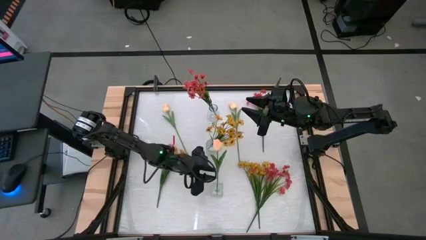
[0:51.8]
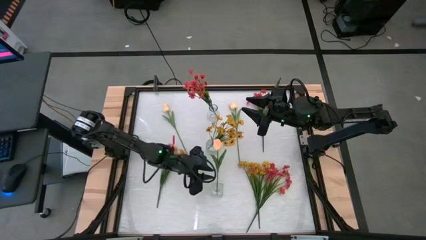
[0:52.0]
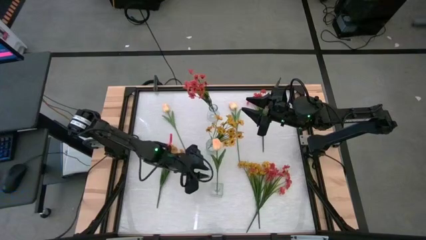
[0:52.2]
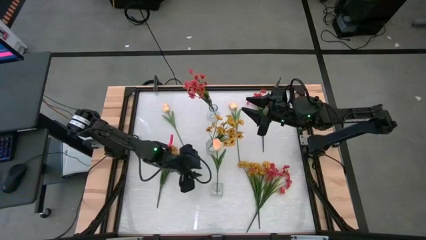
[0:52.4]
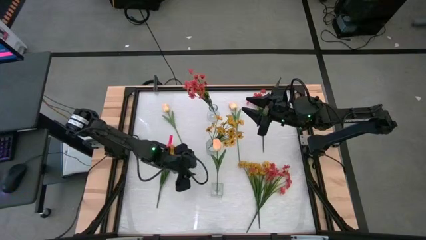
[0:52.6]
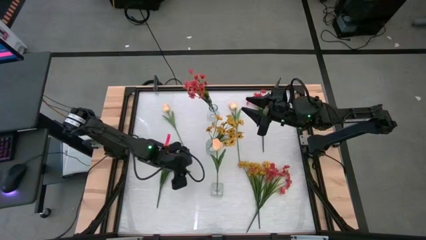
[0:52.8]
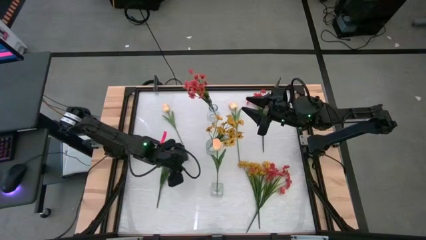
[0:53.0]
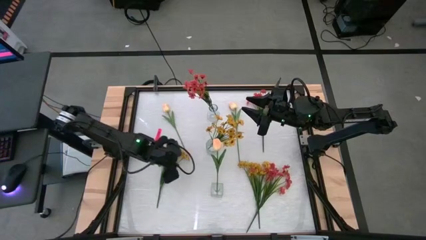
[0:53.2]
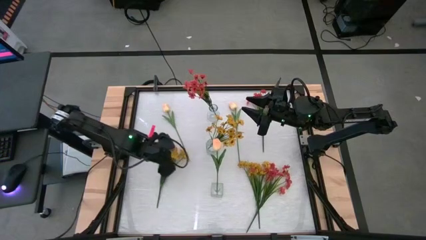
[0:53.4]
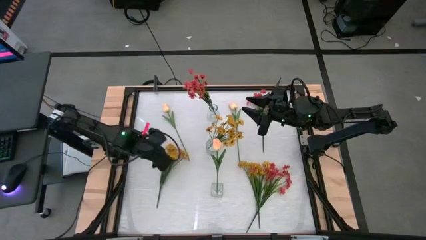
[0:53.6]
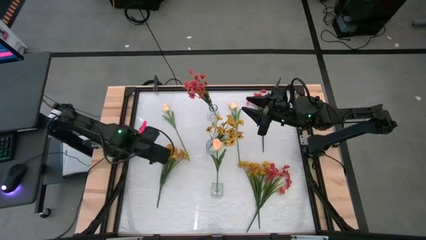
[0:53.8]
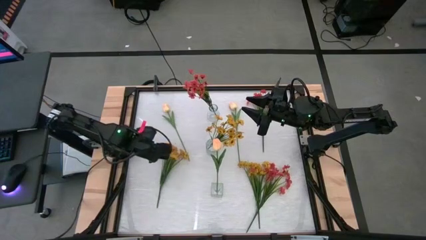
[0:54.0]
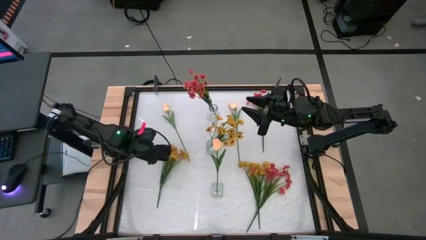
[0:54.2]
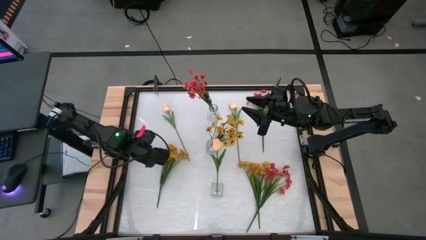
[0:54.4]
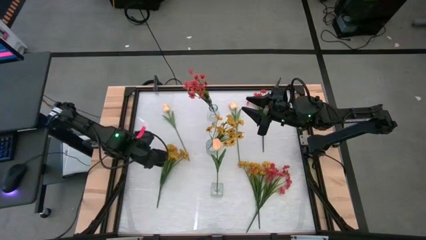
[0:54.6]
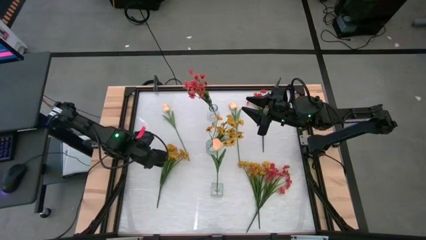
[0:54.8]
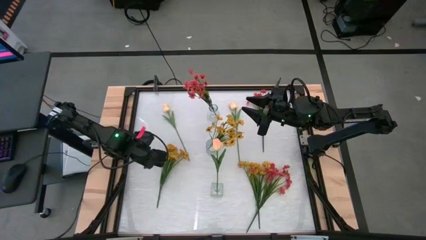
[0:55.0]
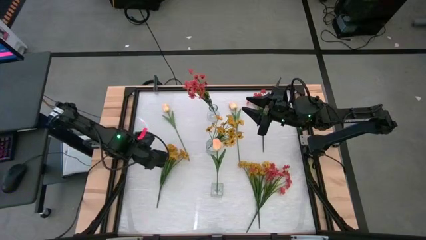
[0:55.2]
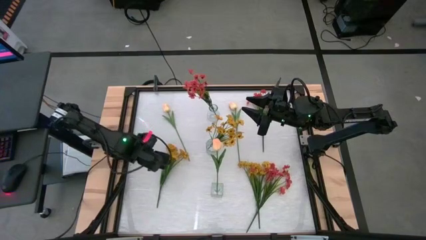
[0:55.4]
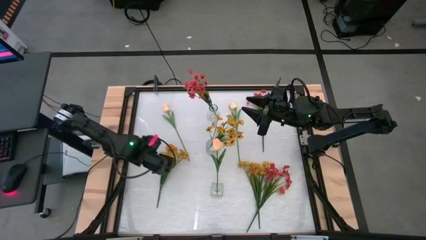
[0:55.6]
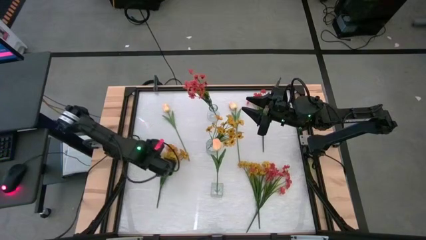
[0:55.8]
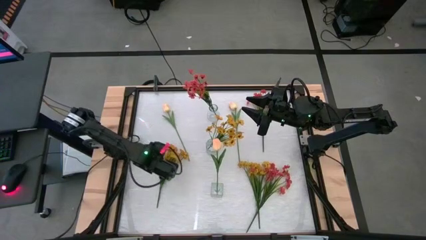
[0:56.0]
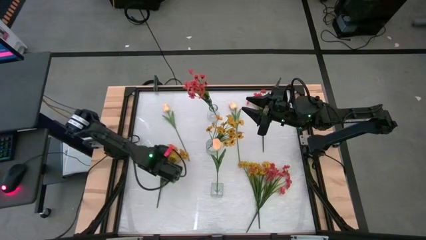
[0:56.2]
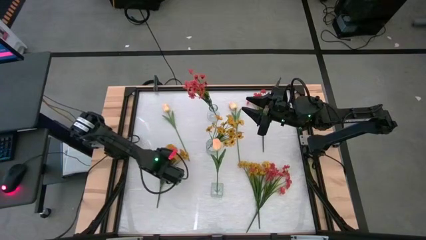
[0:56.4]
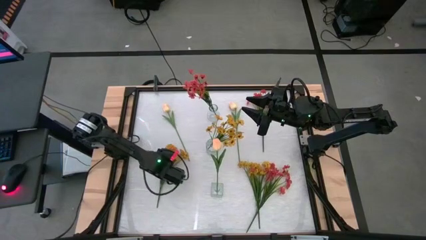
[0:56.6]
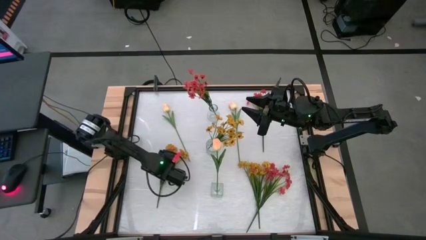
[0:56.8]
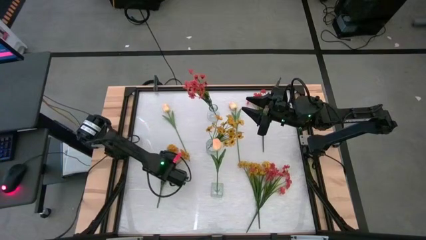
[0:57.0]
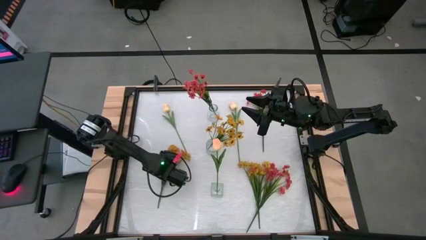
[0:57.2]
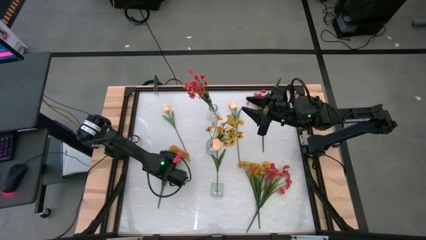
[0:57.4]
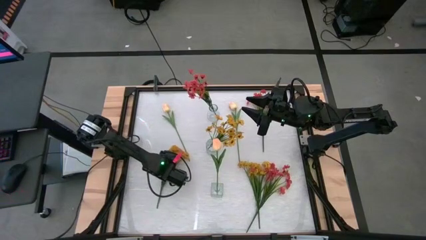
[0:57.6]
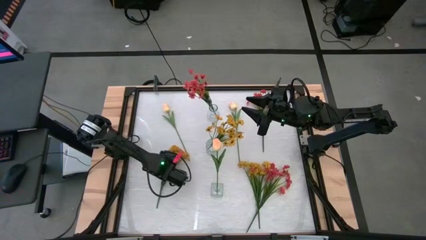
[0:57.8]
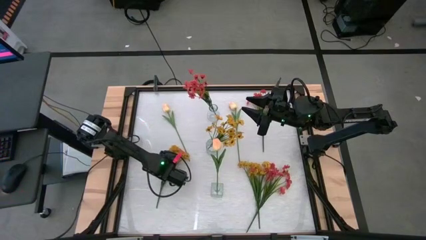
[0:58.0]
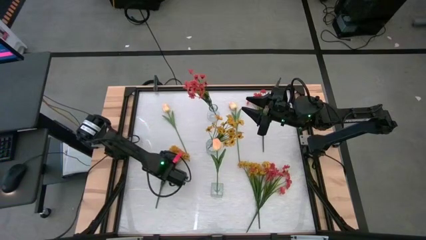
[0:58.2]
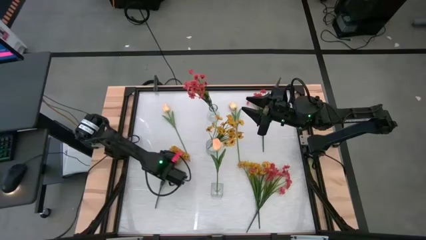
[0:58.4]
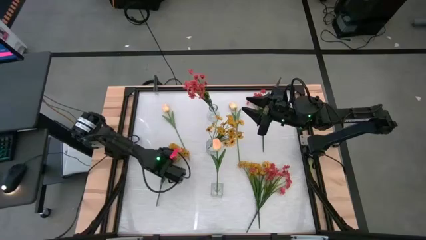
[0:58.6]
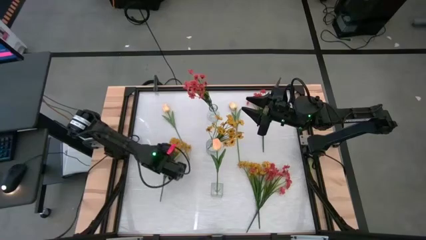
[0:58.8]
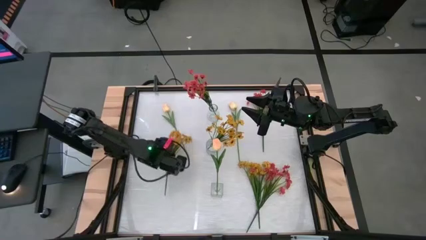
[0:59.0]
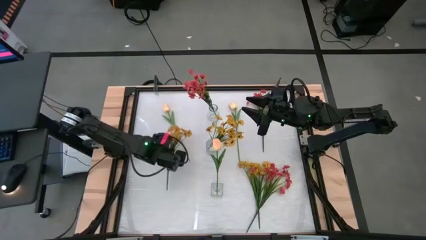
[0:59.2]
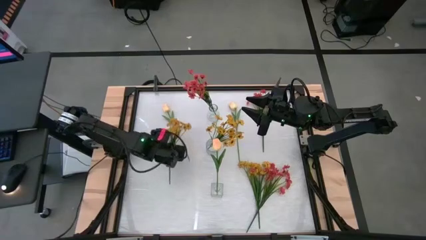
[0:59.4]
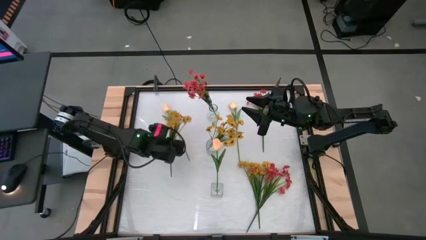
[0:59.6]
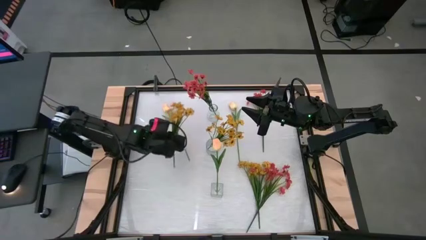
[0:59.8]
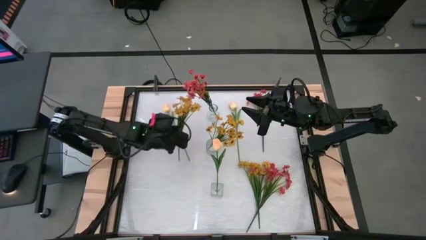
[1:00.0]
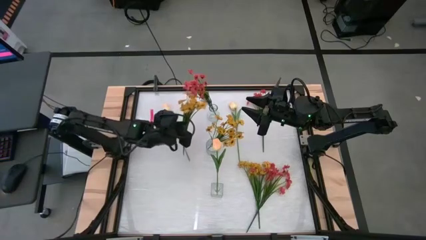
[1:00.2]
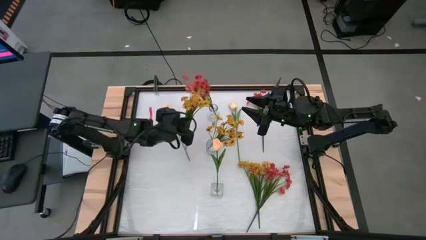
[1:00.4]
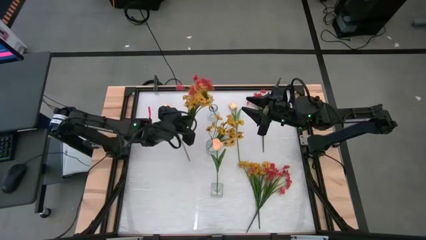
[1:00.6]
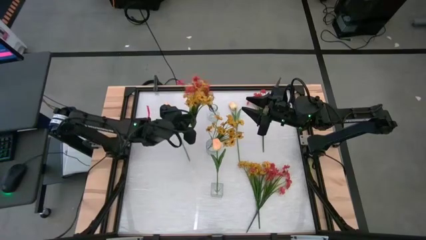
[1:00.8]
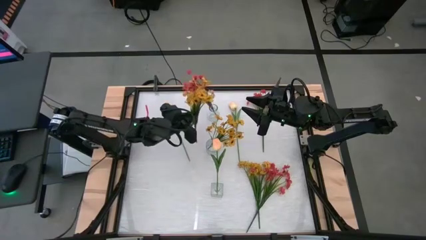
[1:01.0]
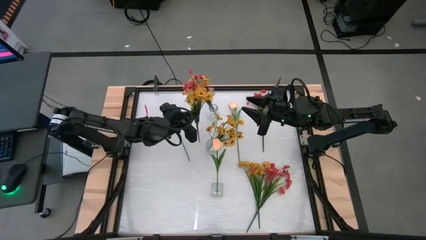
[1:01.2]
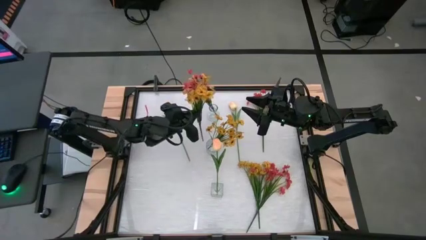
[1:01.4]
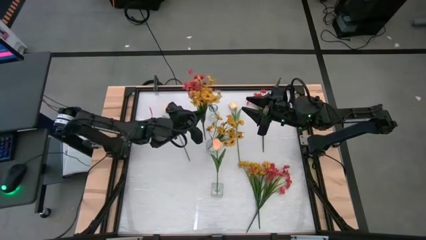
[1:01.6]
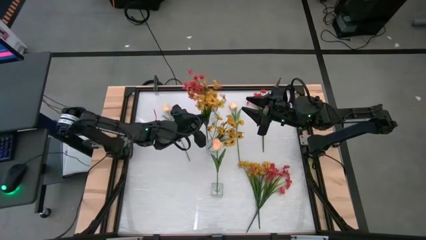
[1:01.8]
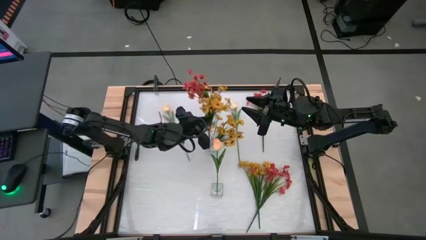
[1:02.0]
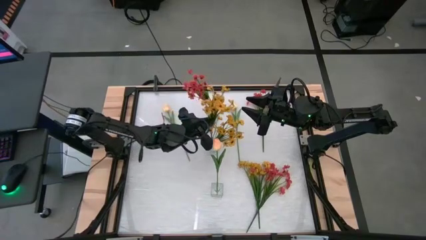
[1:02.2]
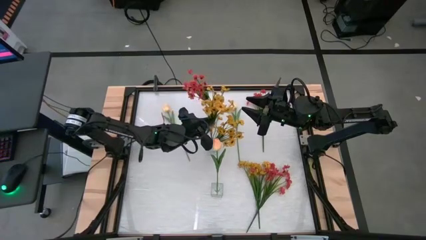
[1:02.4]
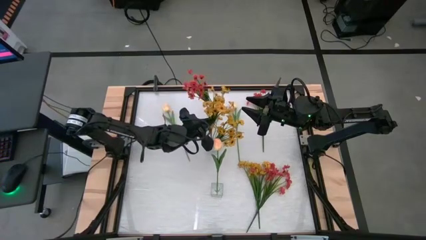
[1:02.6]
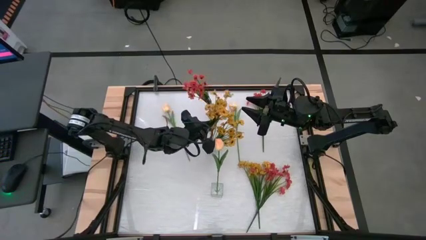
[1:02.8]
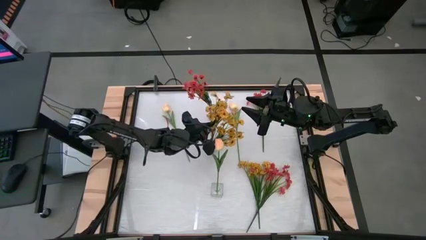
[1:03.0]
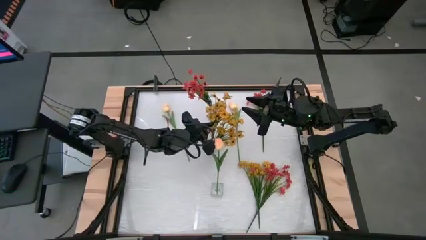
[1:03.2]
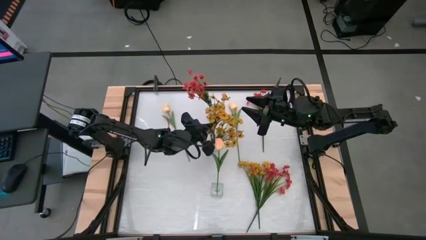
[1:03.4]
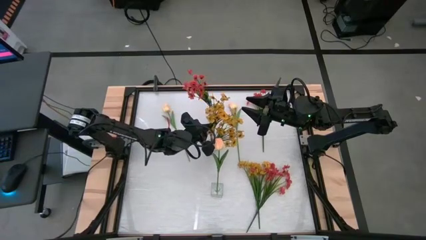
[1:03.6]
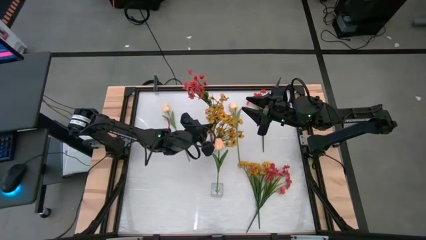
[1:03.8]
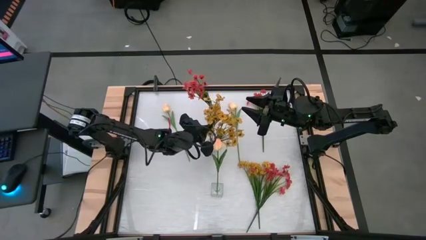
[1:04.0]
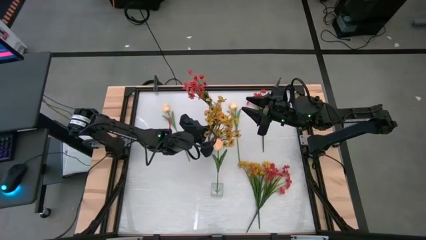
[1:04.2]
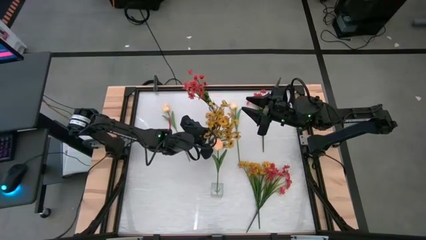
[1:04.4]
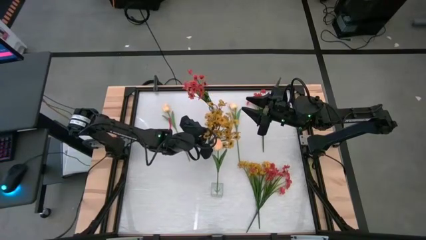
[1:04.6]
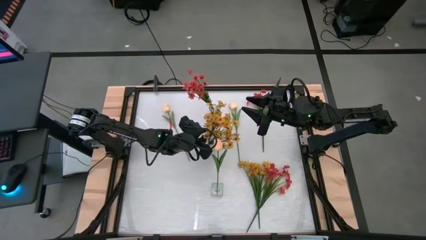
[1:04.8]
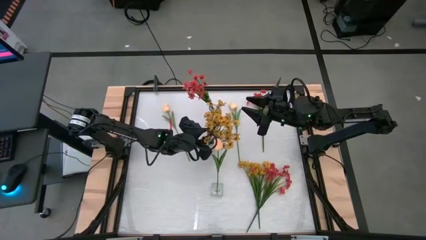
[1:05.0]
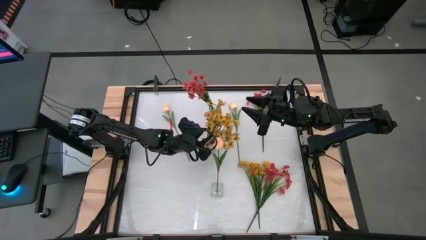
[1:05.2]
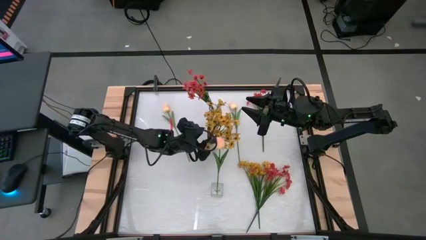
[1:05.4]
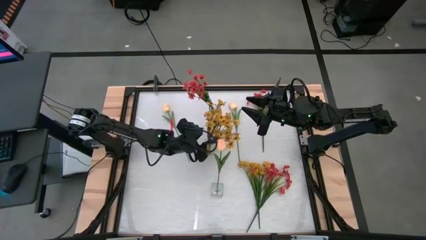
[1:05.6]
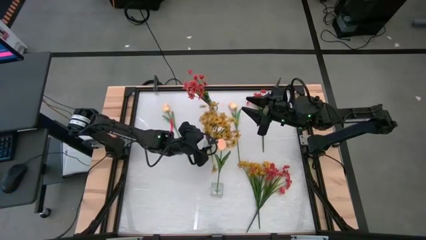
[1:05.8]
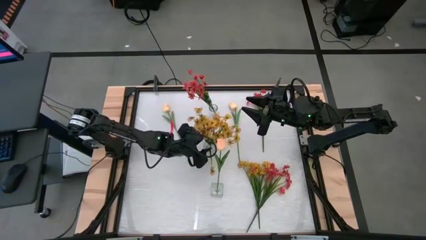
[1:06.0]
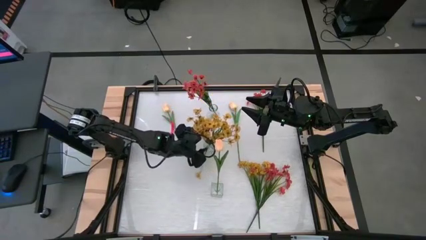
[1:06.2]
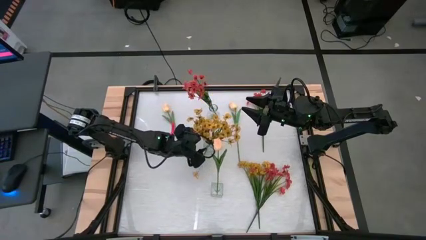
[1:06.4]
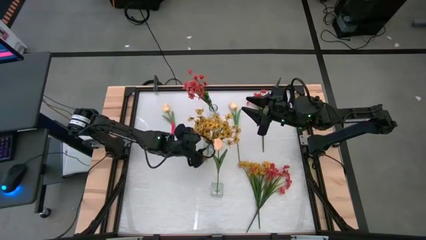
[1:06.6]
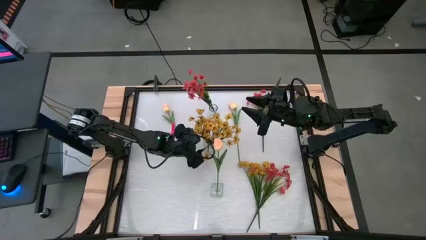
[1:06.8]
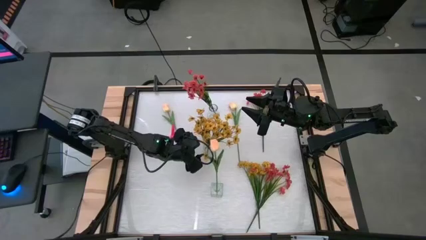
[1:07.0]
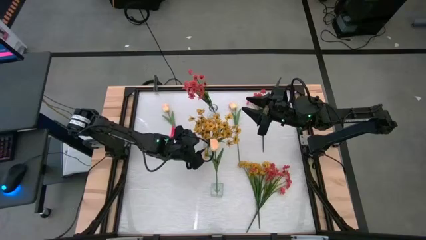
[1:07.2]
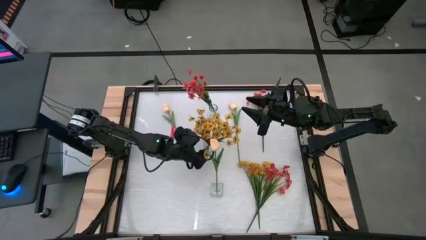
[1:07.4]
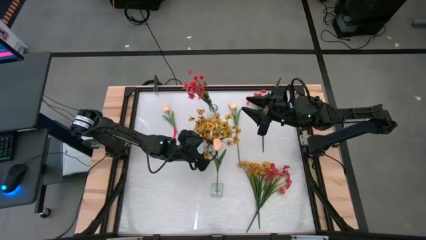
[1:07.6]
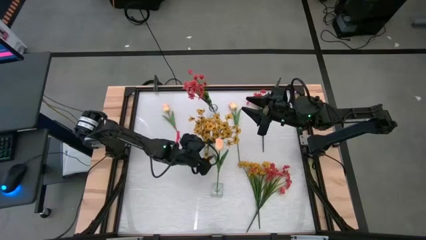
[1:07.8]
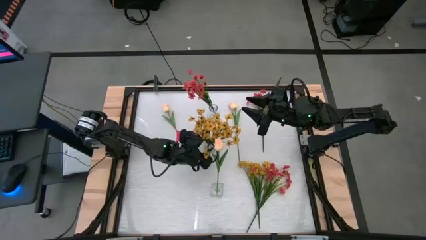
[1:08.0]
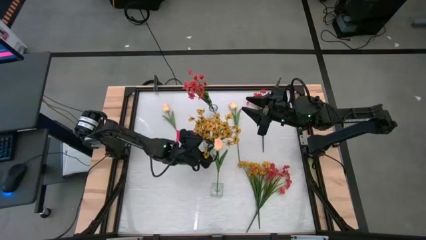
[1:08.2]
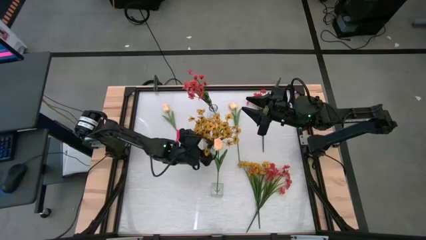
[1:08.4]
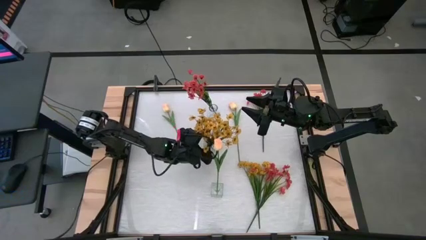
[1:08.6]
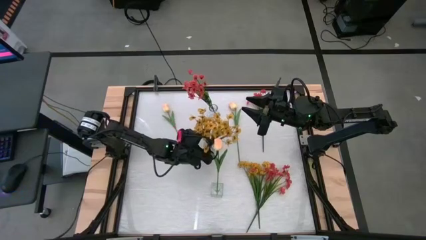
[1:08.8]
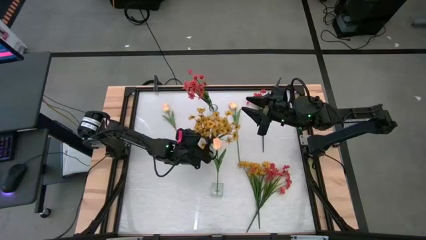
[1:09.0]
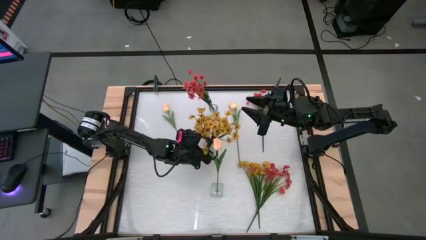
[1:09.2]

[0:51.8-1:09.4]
Task: Sort flowers into vase by color
Put the left yellow flowers into the middle transparent vase
